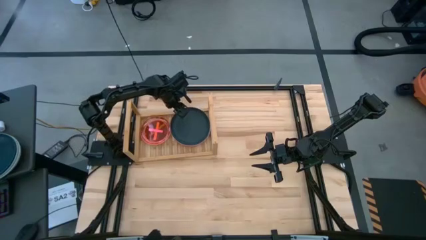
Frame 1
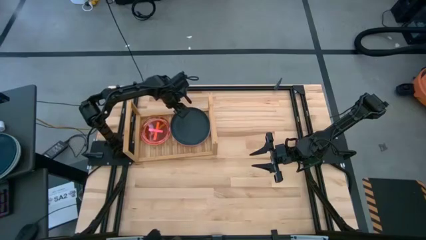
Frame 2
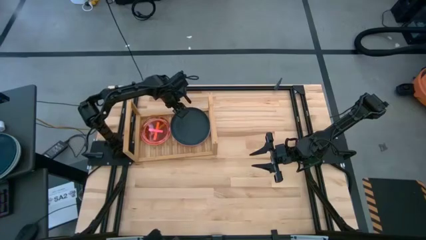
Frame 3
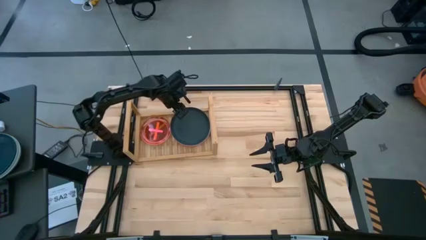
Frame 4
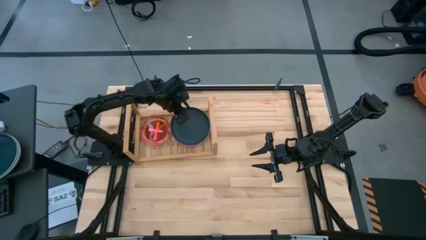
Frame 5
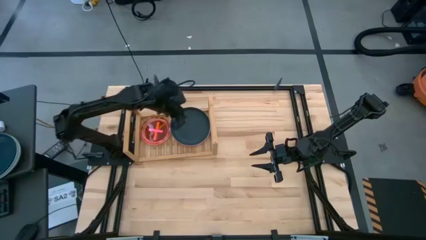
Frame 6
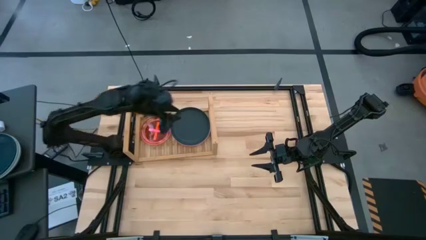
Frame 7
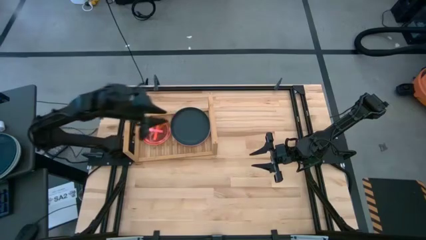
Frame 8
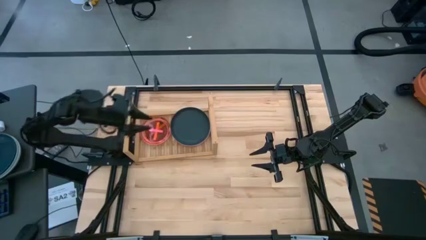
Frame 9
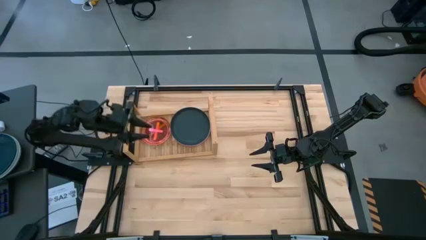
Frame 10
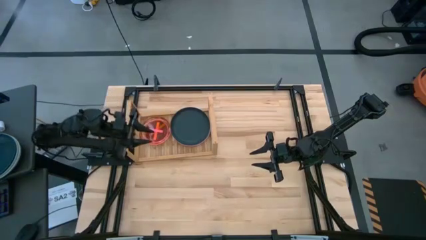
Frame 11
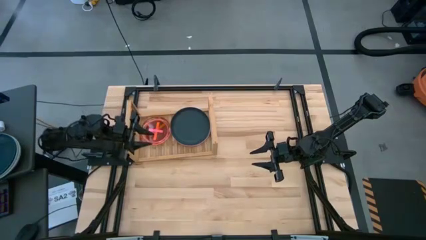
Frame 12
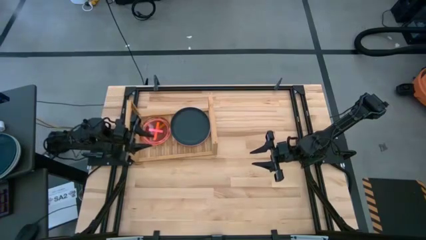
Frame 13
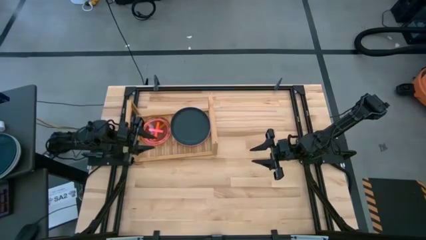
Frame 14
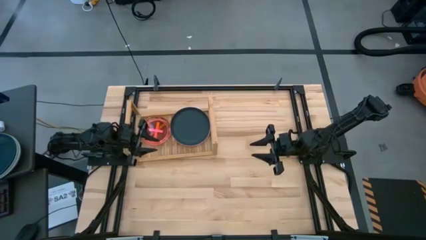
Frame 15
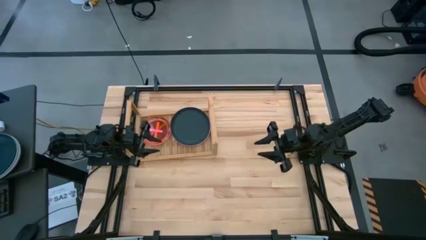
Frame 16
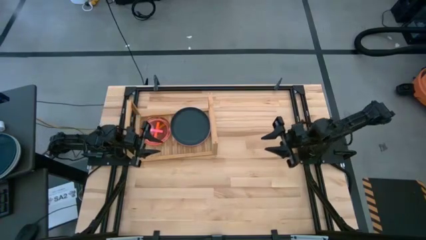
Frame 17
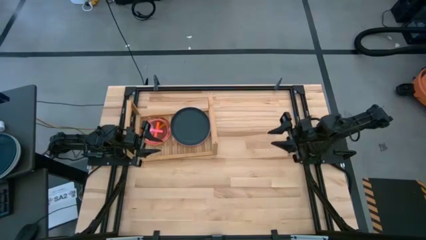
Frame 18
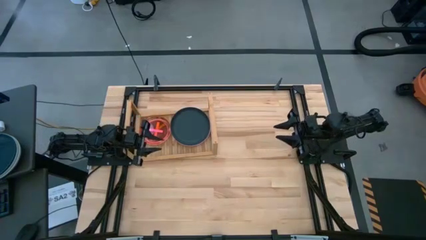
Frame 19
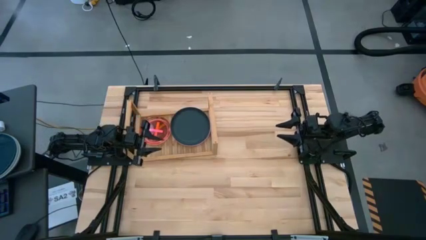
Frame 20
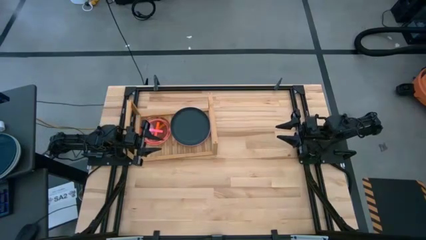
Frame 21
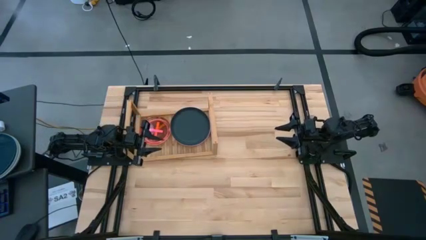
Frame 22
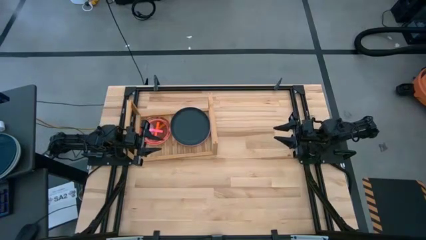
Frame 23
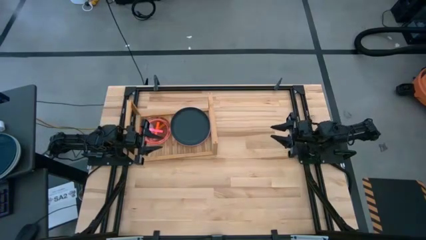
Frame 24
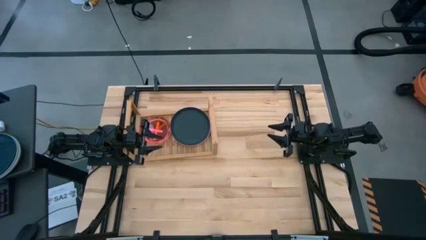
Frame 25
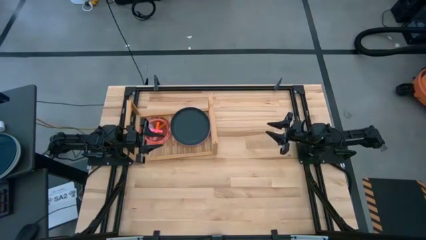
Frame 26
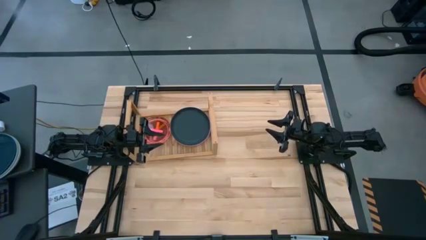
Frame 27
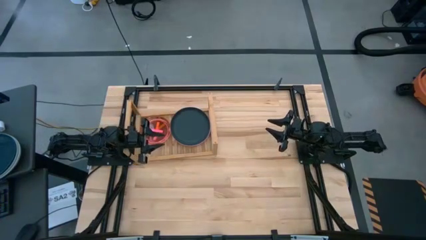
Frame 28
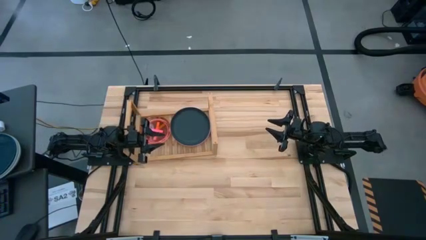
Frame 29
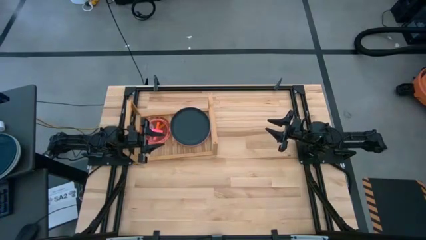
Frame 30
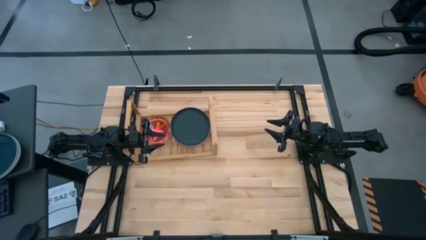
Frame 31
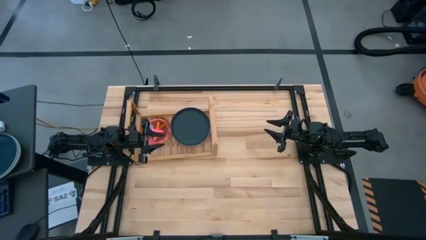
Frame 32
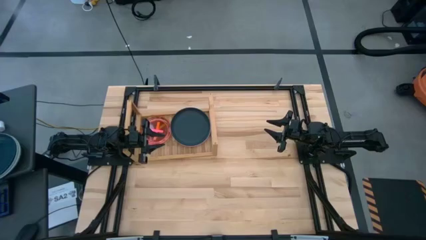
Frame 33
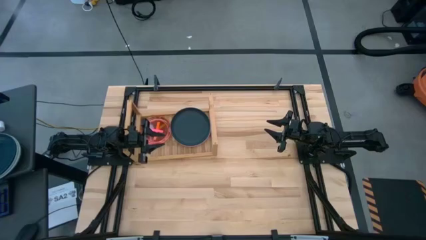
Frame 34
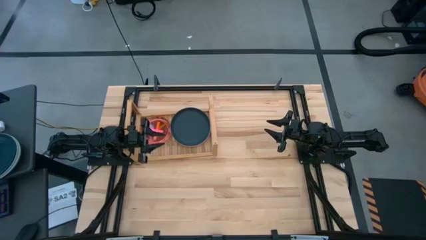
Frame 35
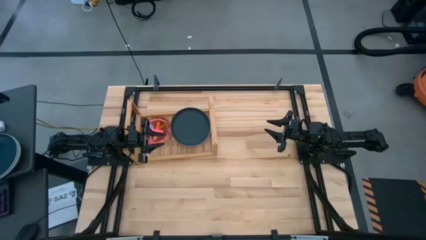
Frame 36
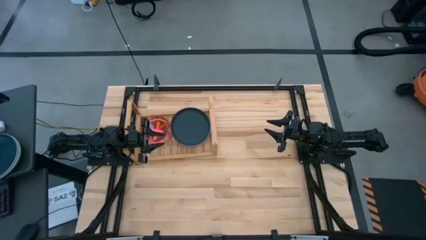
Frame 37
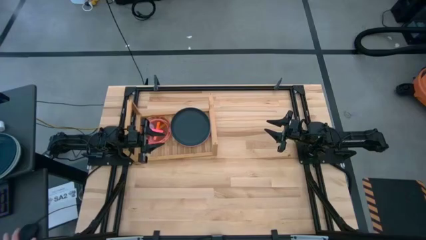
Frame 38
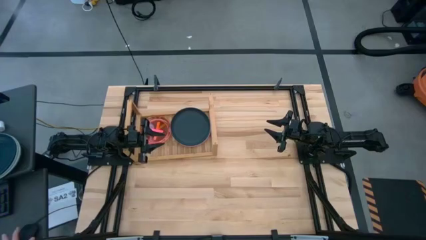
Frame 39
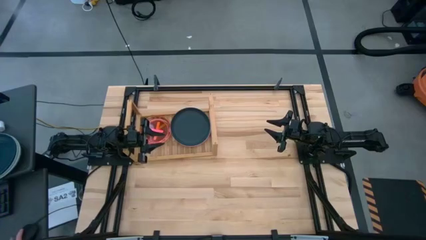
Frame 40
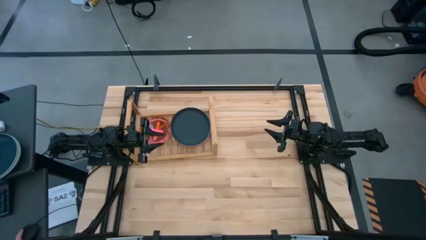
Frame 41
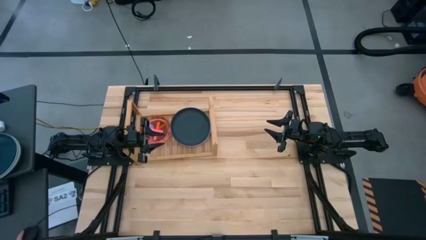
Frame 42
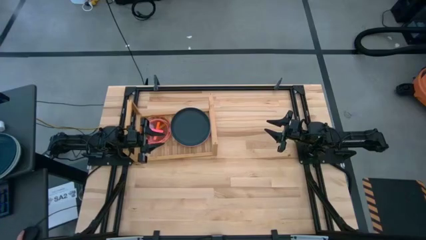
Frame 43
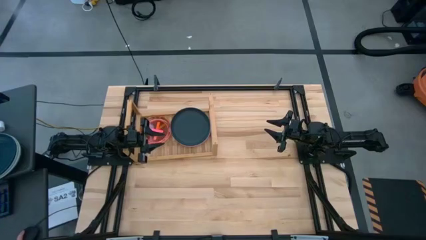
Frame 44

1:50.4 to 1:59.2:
Task: Place and stack plates onto a shelf
Return to Home Position

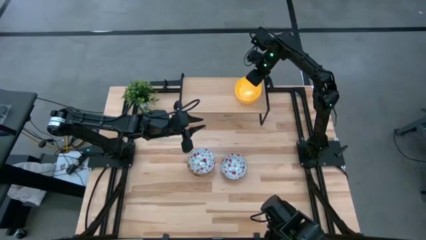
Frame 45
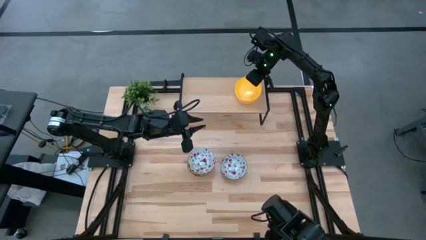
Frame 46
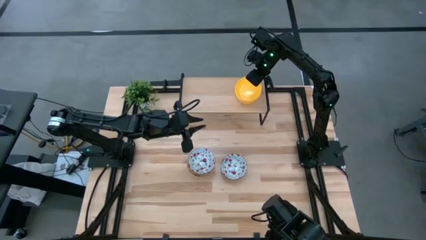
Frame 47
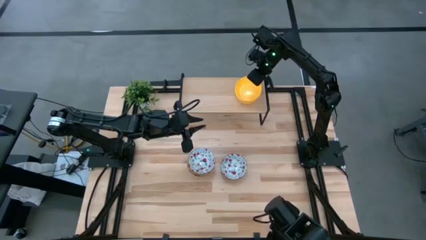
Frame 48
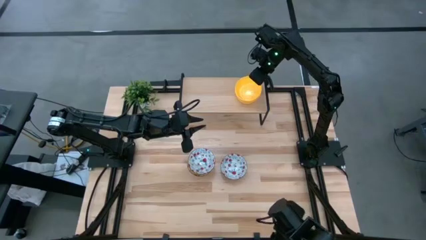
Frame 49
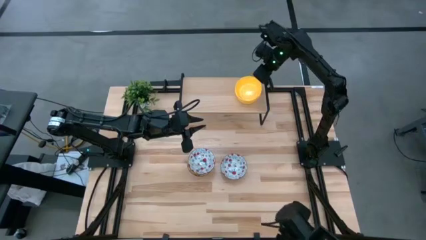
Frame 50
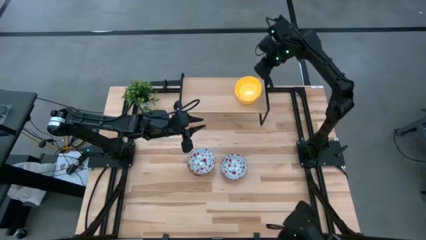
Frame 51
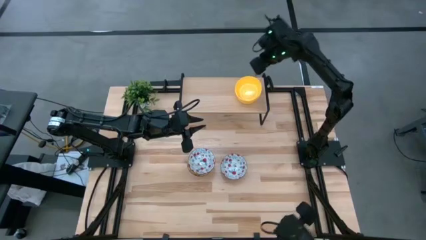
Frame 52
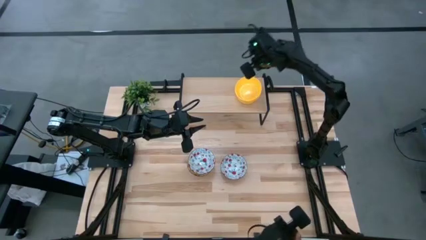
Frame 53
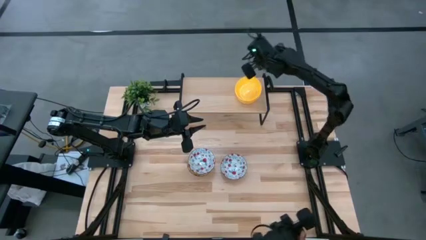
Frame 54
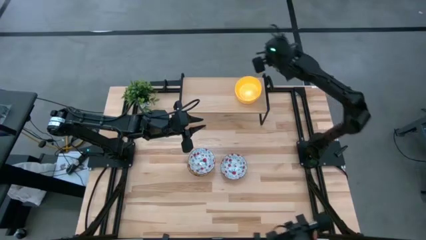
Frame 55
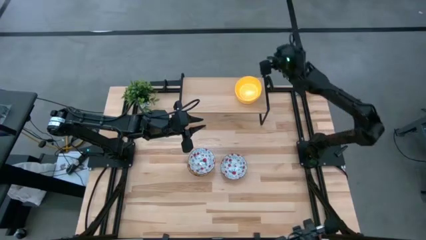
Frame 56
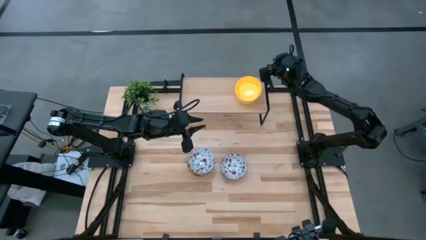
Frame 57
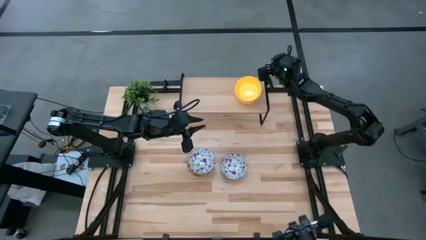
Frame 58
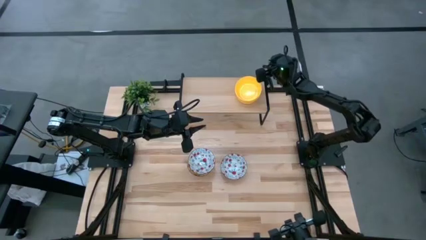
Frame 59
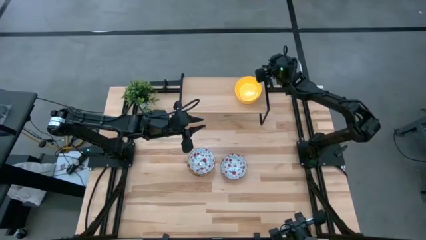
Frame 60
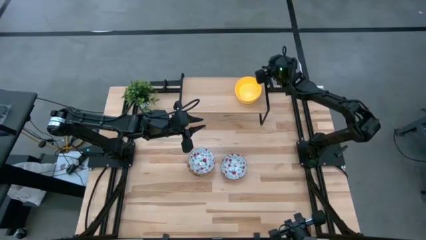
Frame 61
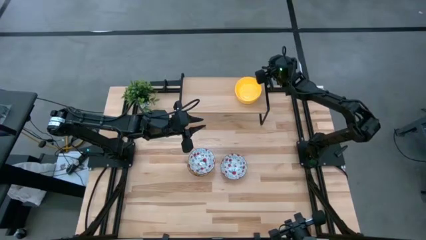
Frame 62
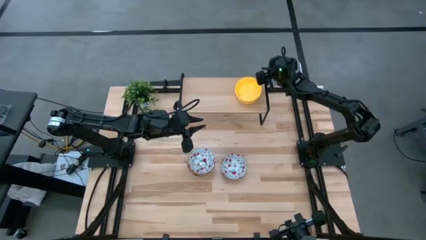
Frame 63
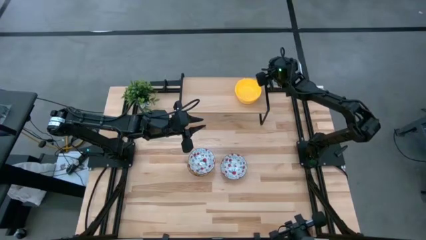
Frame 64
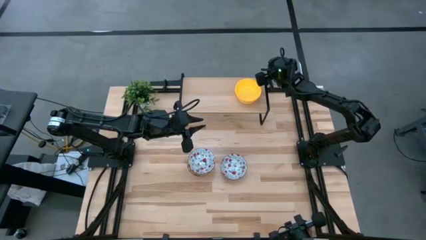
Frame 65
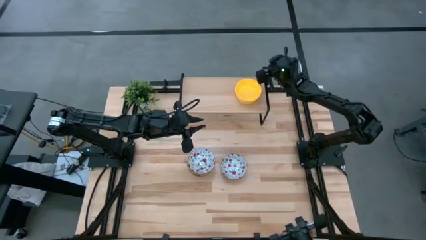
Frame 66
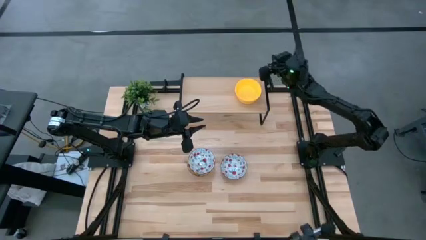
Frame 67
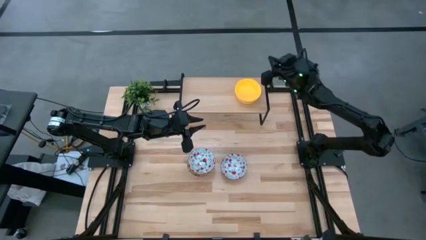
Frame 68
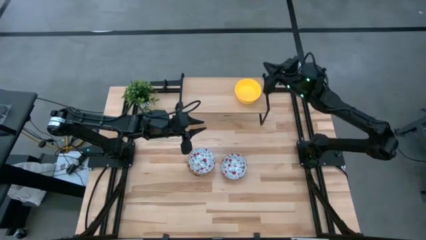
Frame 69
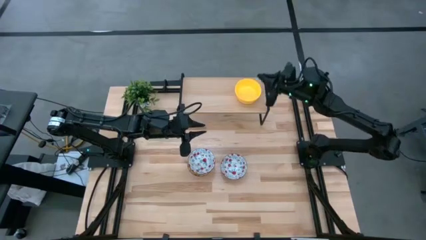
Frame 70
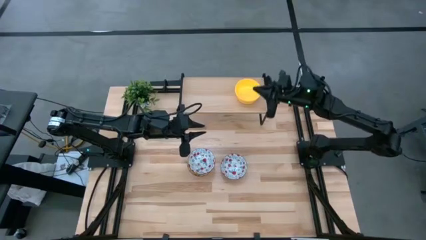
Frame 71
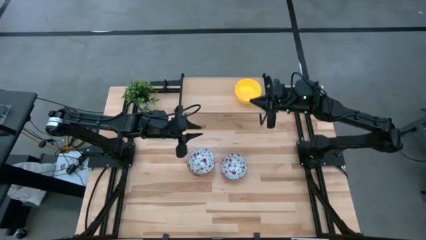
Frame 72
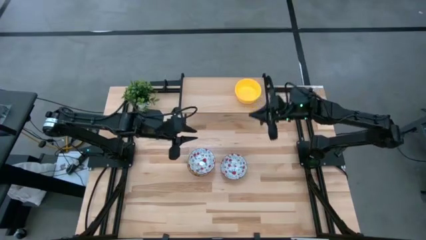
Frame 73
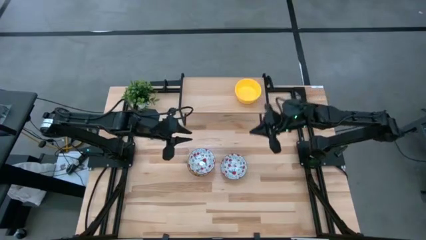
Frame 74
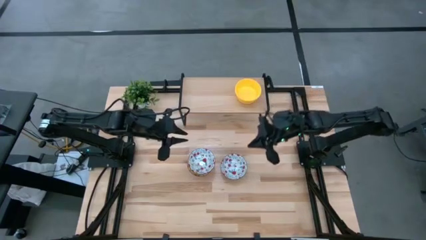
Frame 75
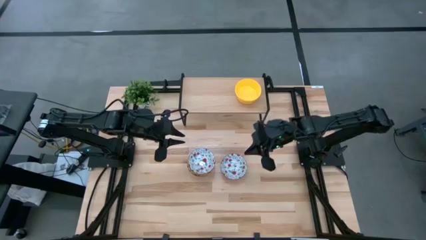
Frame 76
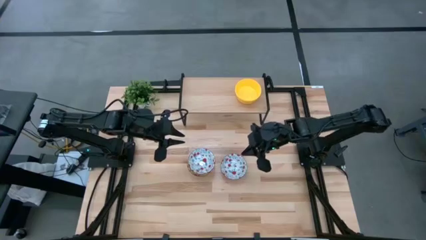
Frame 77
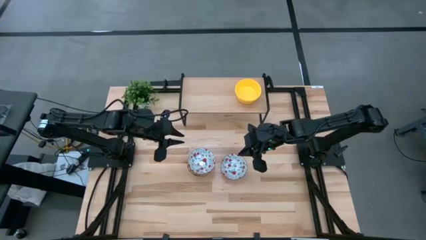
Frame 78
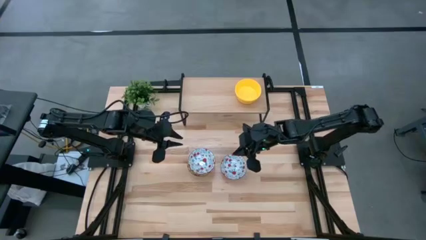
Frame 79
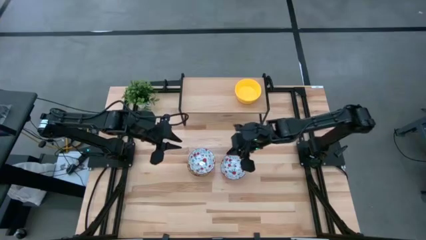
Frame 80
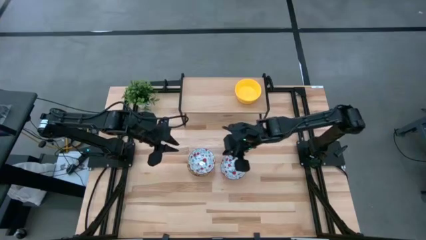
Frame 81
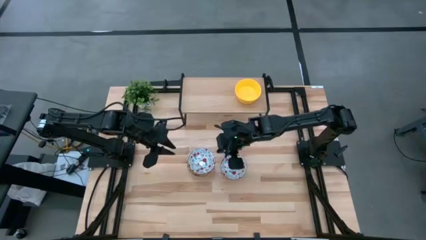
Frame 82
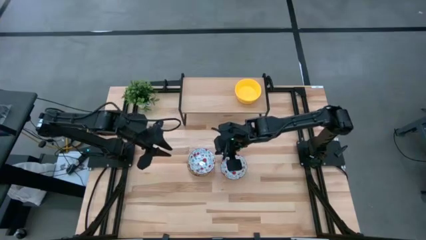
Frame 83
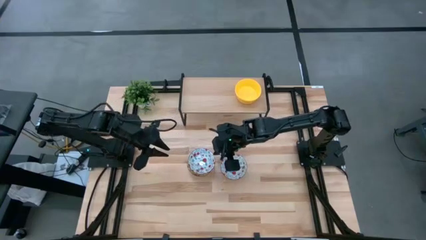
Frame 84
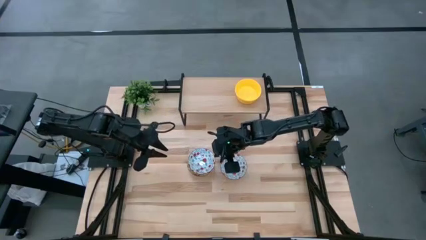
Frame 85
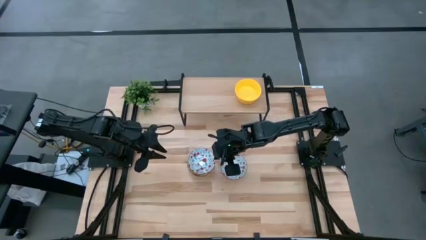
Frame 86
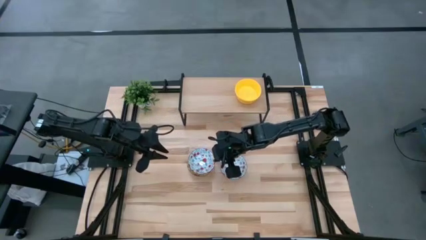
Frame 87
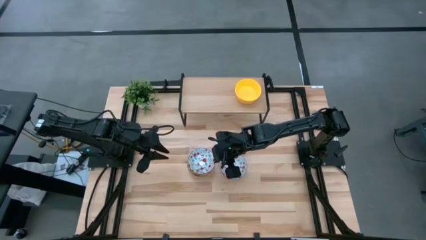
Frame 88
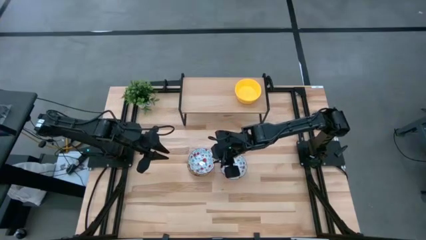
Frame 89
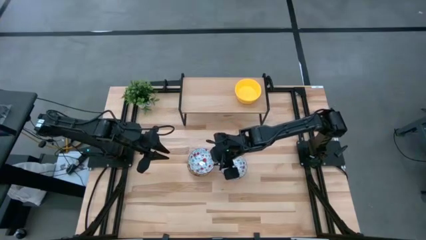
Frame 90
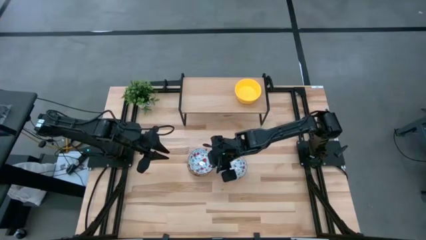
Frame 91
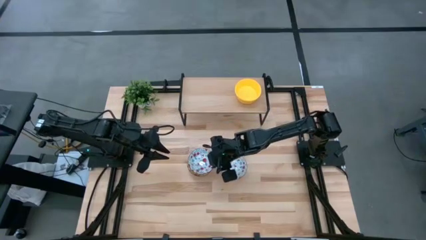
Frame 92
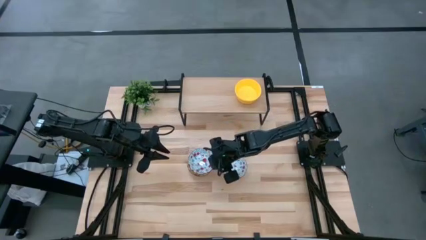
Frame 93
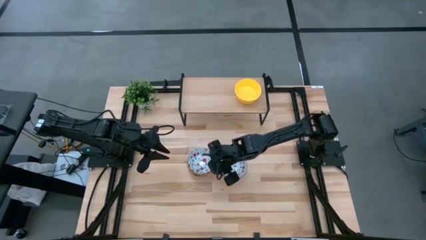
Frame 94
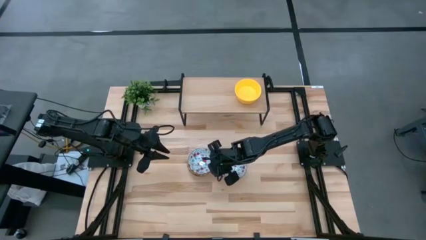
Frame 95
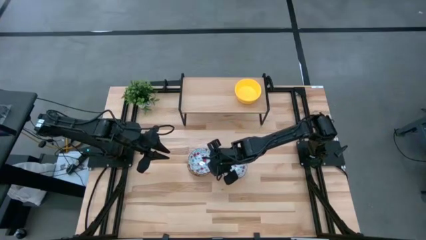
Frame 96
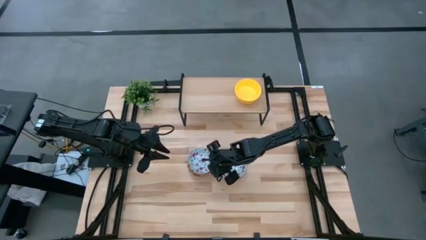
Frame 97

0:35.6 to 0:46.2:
Task: Pick & Place Mini bowls
Remove the red bowl from the stacked bowls
